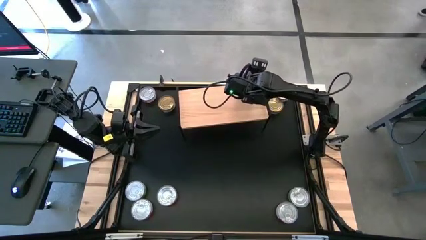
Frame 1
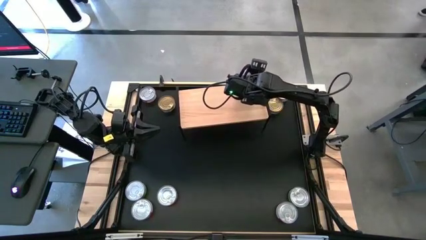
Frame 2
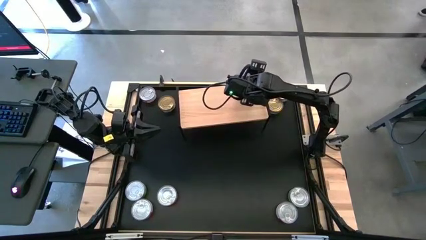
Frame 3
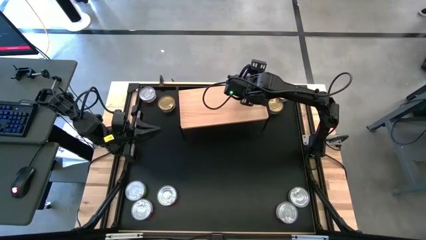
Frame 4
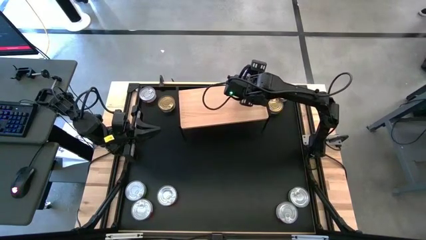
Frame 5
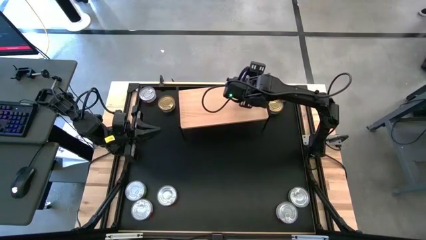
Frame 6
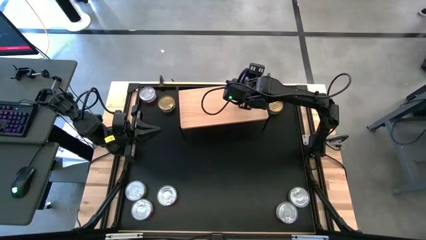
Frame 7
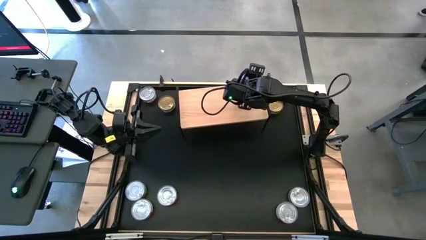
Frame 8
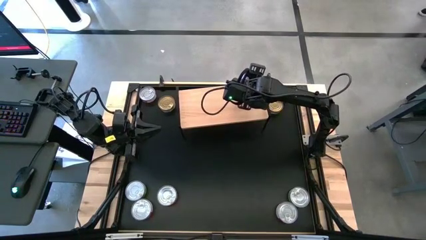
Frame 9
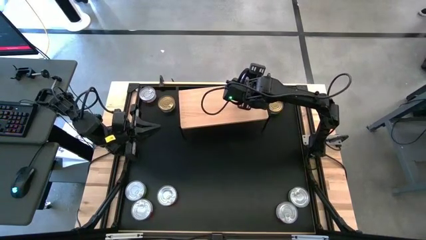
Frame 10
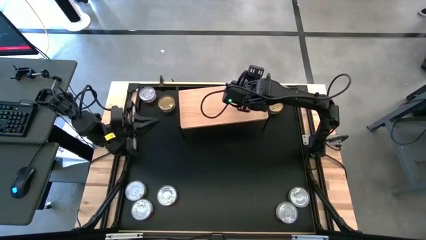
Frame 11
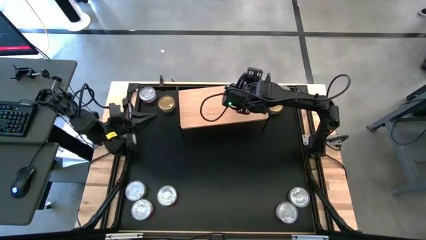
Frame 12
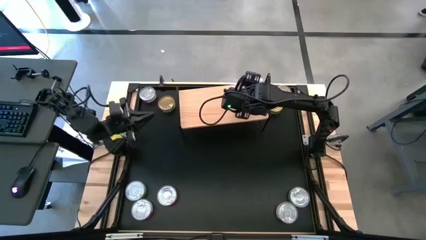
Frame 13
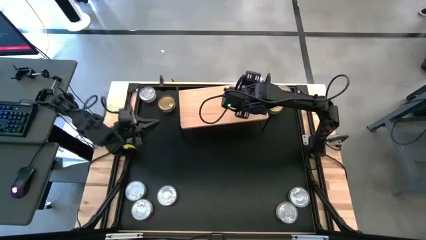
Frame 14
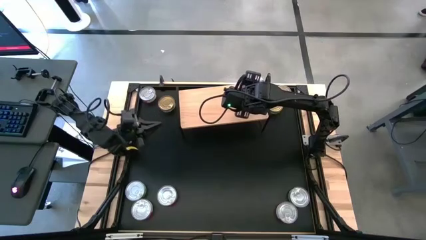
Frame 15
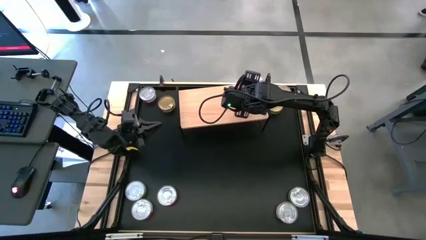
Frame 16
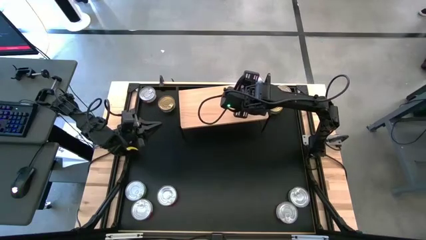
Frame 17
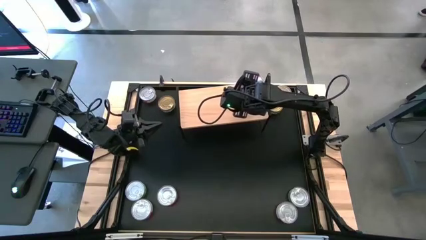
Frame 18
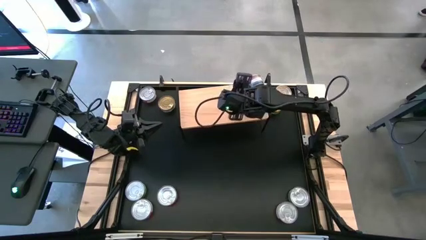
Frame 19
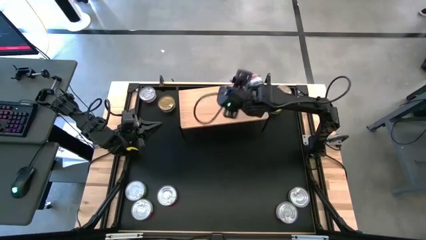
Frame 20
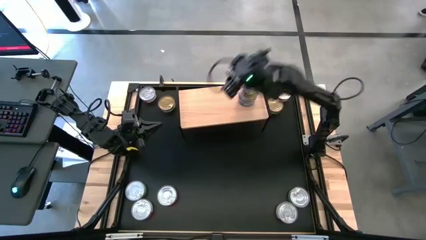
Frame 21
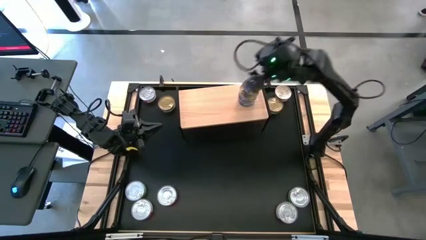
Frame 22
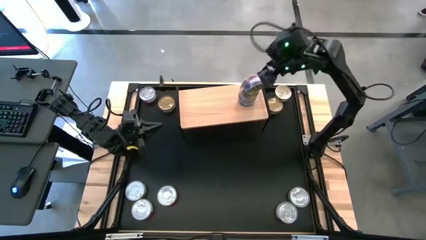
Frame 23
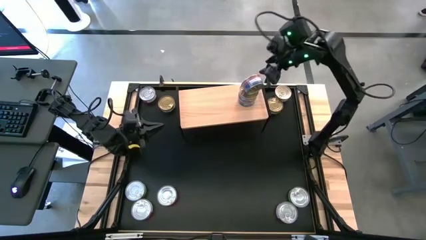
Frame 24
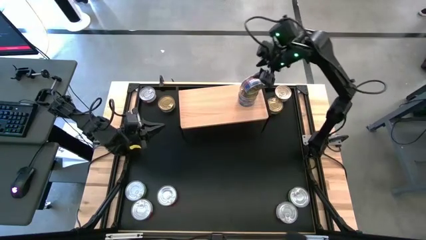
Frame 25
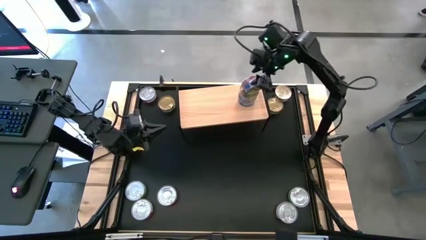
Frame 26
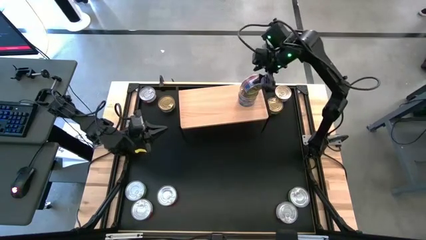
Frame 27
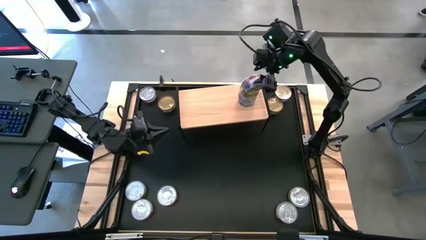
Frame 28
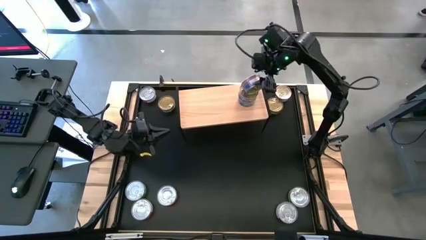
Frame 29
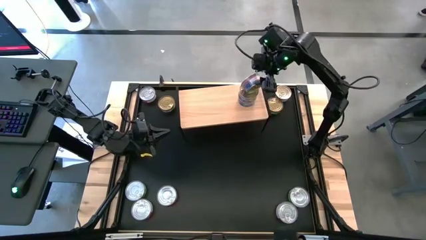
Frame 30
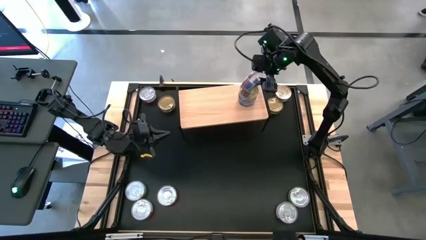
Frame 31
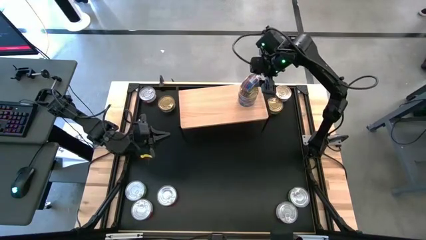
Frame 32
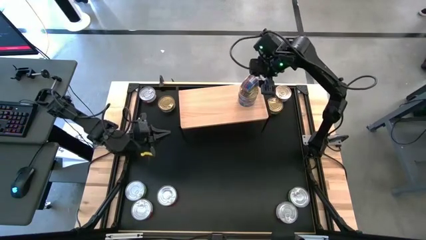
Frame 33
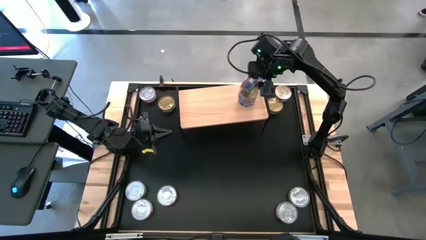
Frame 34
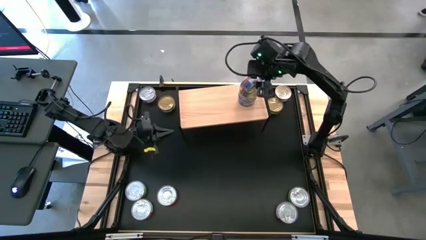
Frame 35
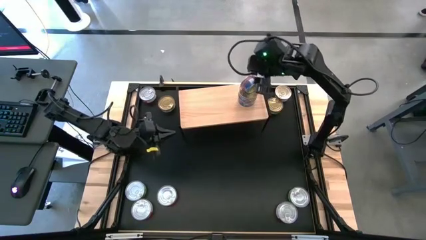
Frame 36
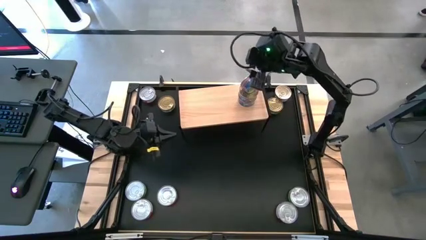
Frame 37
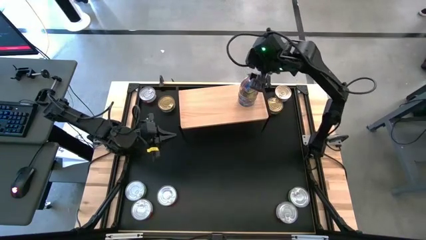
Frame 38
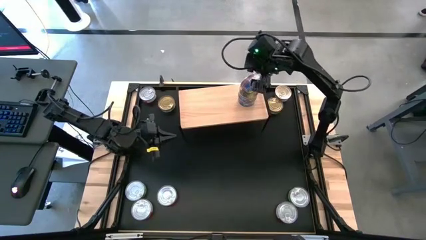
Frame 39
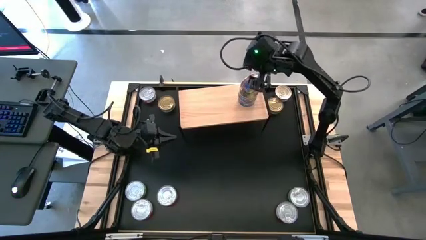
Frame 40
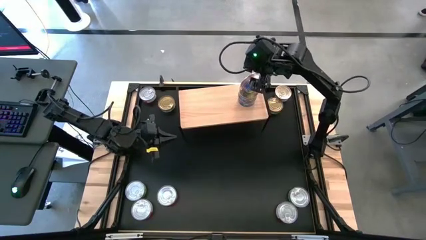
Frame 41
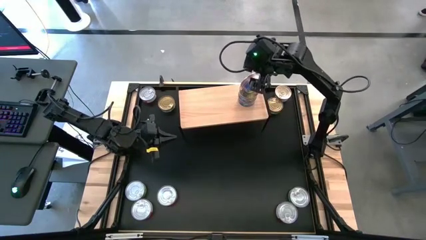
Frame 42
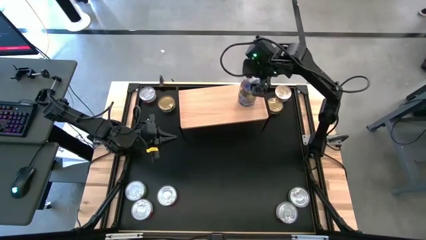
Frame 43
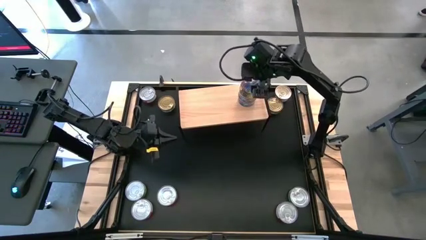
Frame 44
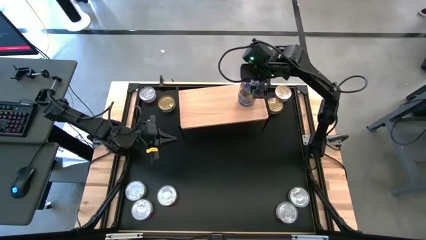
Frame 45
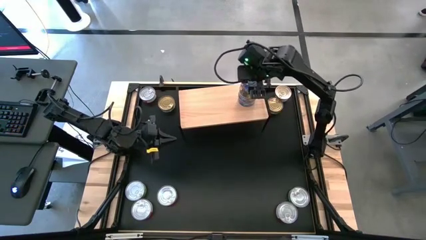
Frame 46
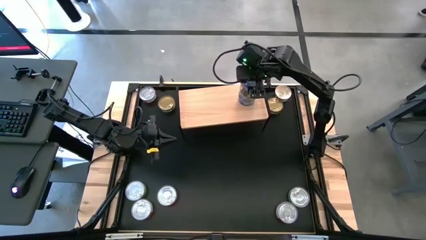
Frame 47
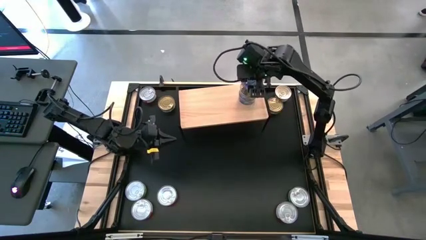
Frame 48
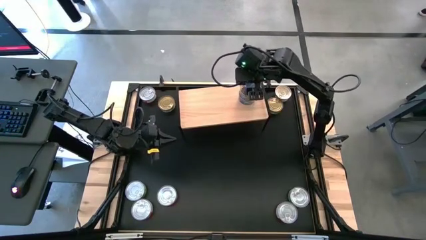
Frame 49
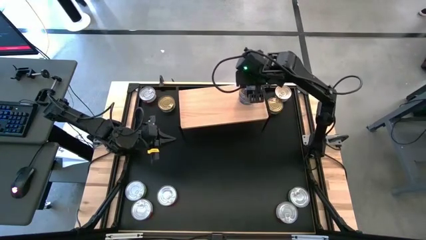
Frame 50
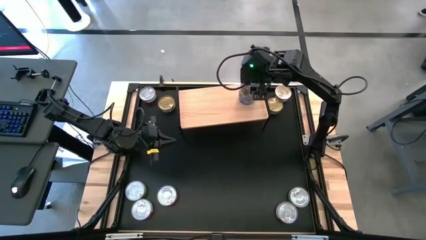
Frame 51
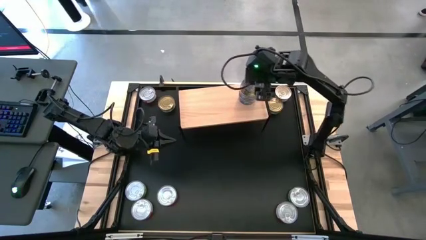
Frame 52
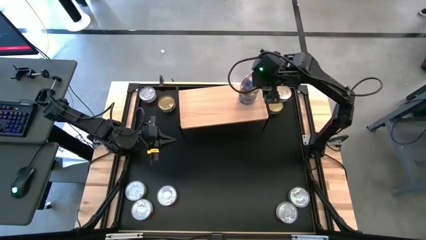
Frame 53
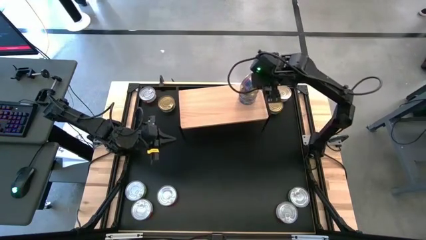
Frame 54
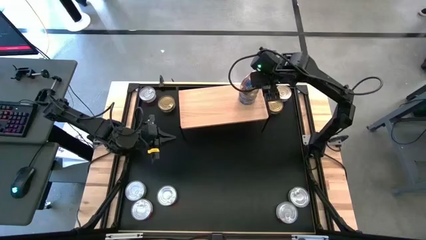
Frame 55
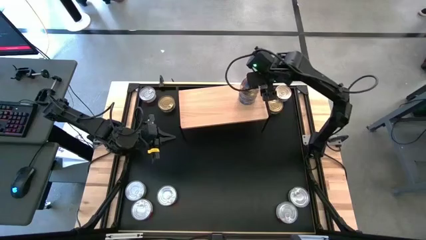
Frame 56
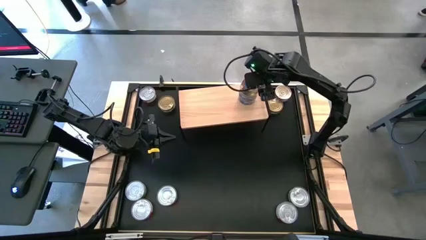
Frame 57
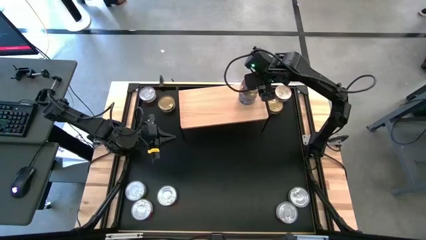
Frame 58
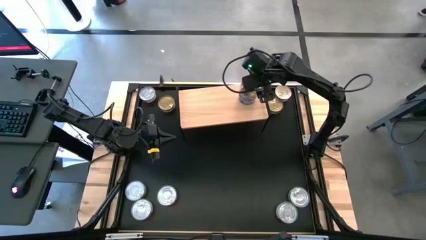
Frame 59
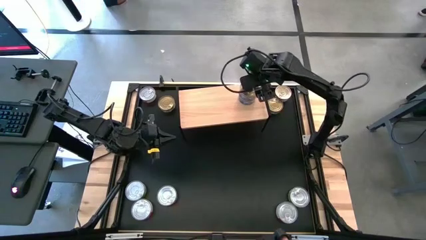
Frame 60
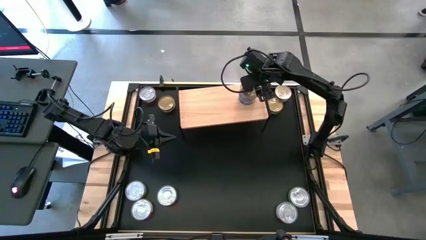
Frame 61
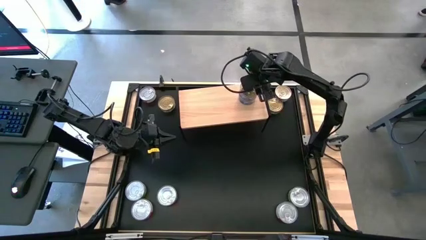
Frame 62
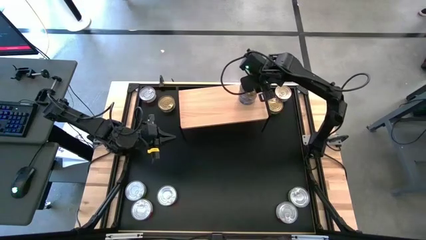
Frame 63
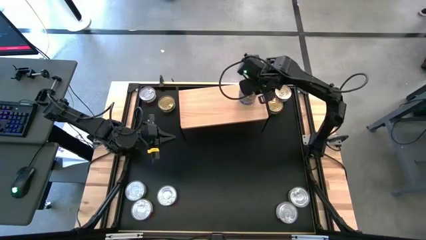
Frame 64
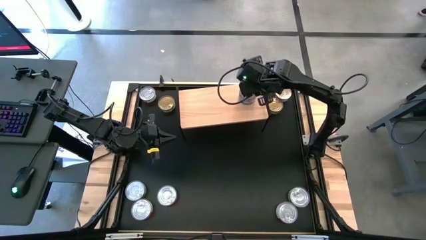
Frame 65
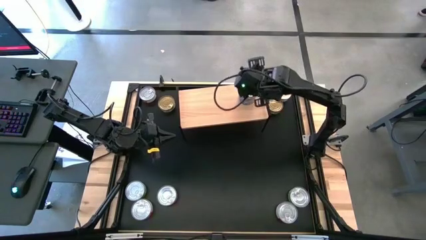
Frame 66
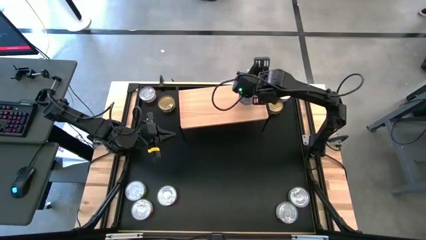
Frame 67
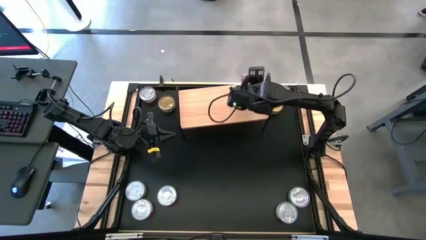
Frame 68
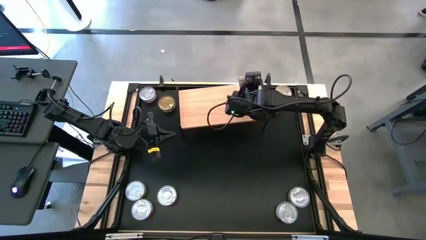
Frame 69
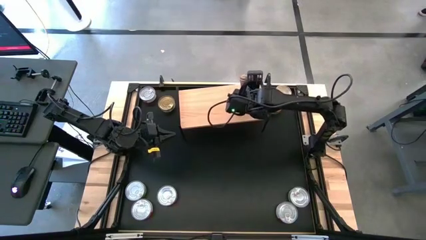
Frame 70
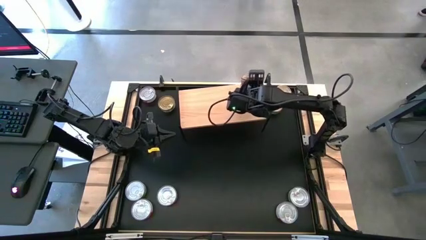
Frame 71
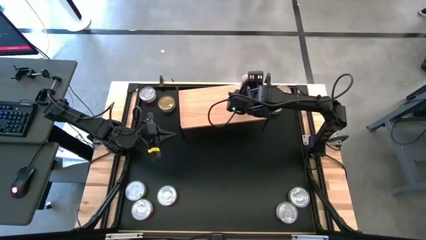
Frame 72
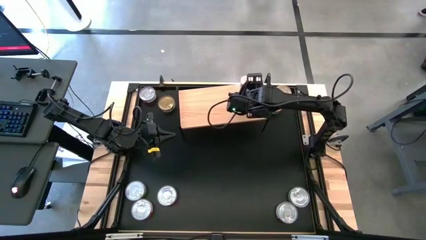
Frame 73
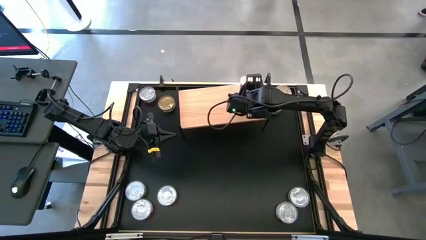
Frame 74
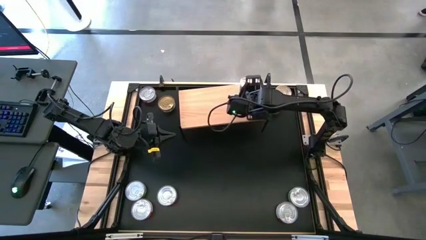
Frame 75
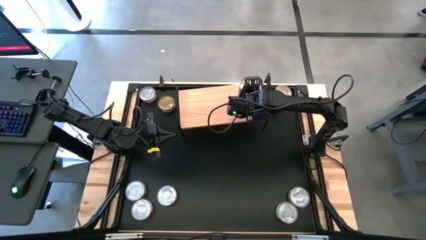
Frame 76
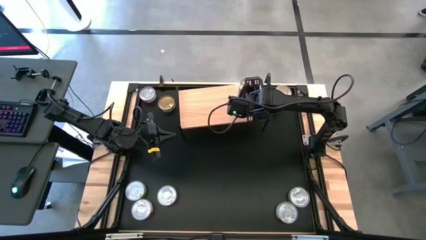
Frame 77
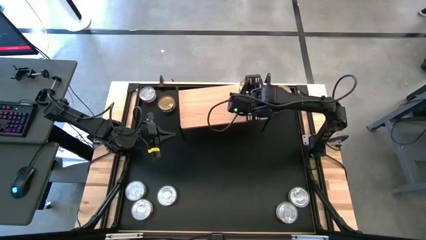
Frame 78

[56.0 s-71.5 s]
Task: Stack canned seafood by type on shelf
Stack the blue and pink tuna can on top of the blue and pink tuna can on the shelf
